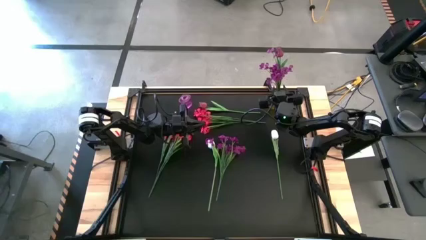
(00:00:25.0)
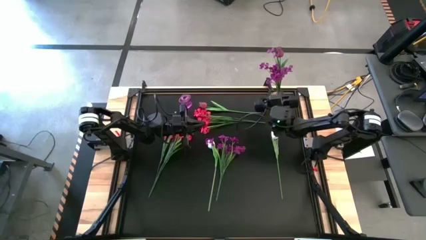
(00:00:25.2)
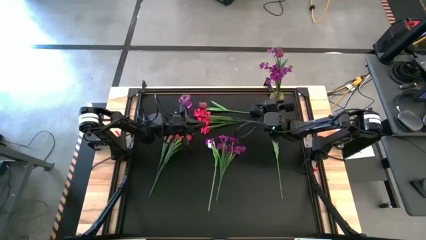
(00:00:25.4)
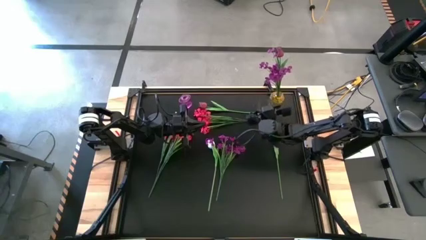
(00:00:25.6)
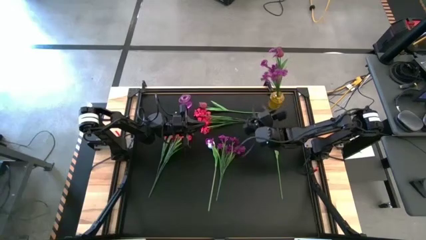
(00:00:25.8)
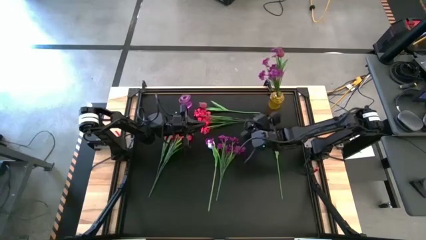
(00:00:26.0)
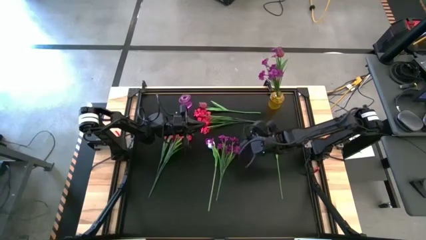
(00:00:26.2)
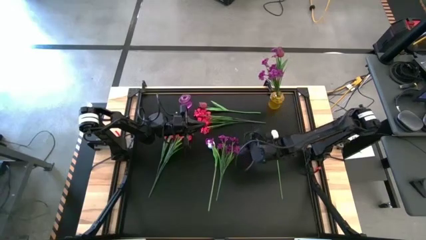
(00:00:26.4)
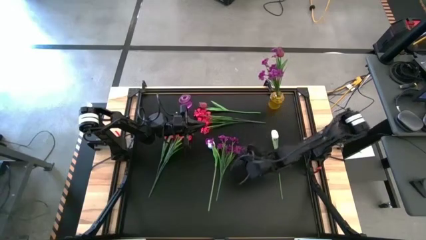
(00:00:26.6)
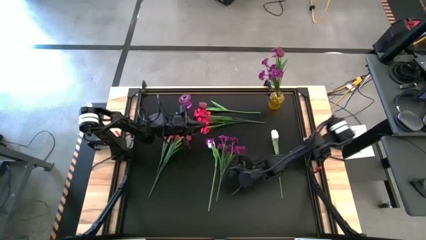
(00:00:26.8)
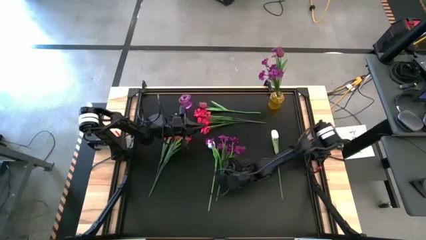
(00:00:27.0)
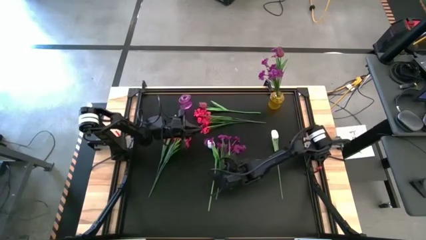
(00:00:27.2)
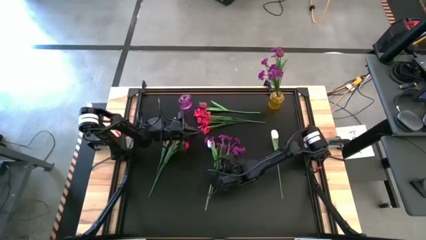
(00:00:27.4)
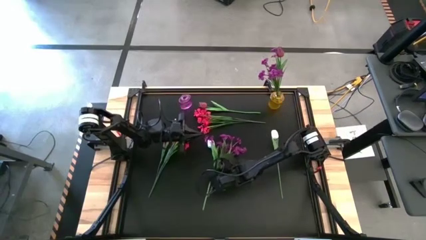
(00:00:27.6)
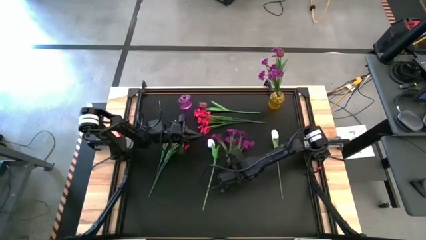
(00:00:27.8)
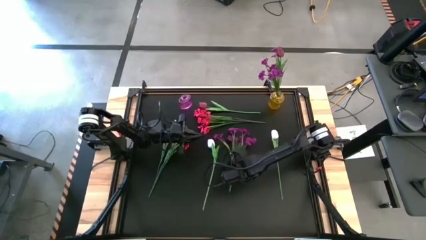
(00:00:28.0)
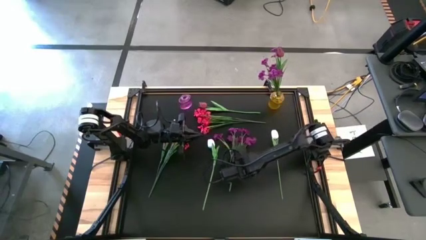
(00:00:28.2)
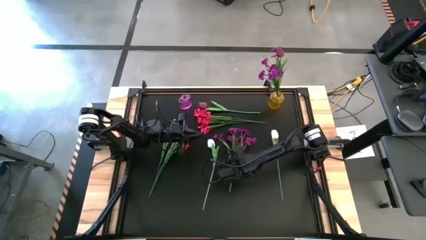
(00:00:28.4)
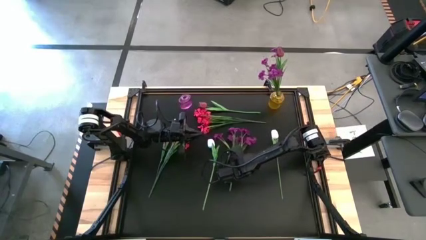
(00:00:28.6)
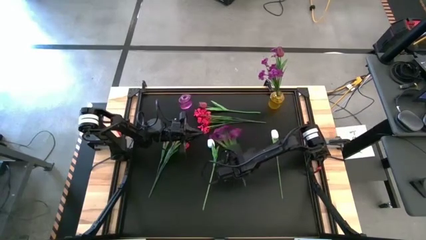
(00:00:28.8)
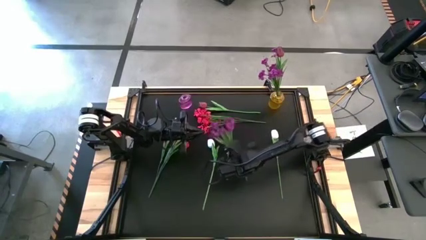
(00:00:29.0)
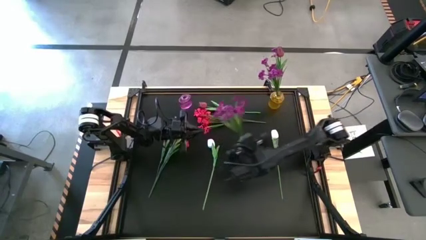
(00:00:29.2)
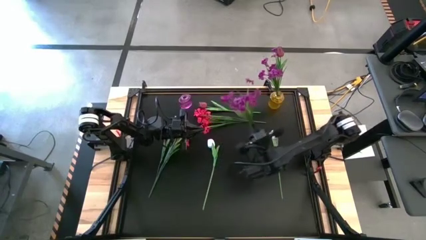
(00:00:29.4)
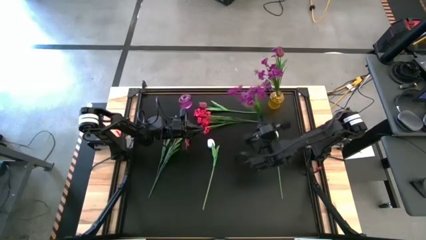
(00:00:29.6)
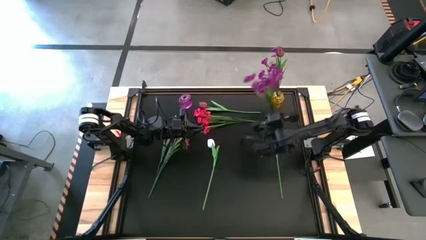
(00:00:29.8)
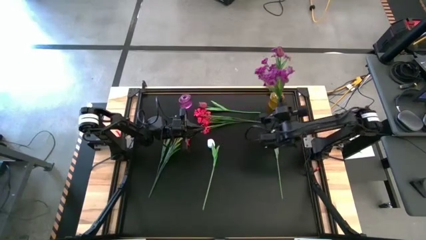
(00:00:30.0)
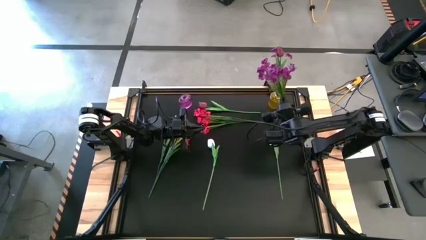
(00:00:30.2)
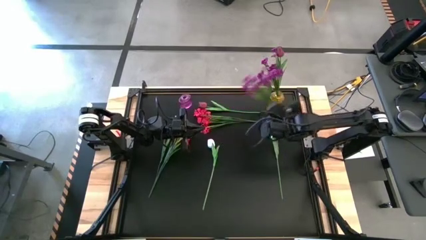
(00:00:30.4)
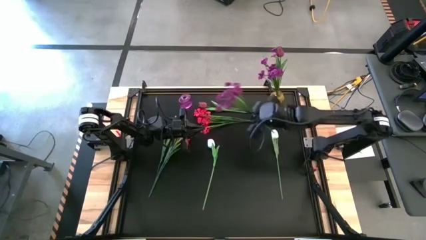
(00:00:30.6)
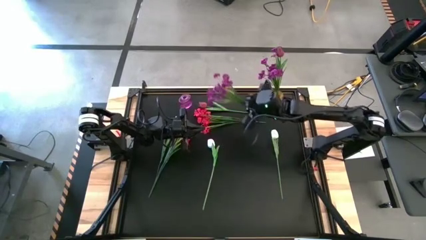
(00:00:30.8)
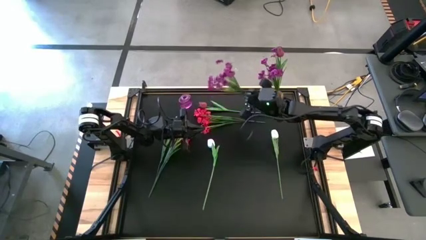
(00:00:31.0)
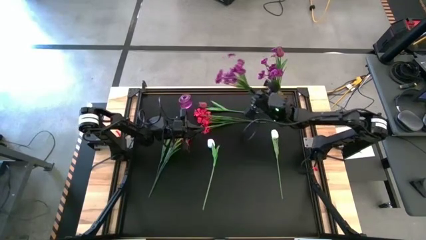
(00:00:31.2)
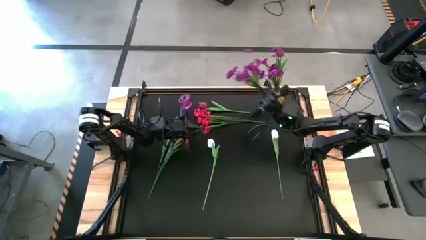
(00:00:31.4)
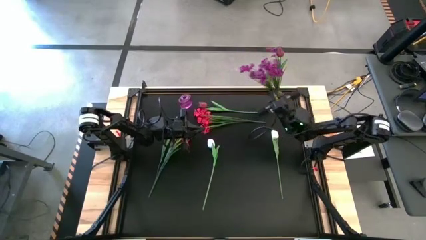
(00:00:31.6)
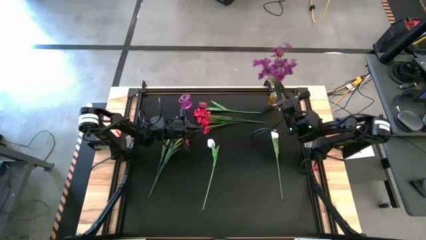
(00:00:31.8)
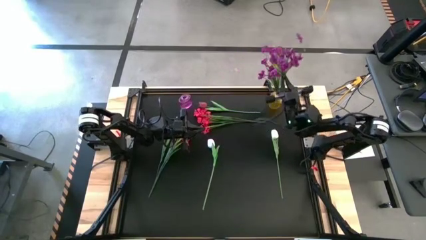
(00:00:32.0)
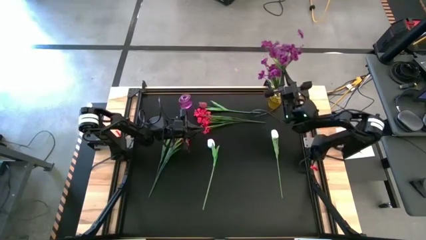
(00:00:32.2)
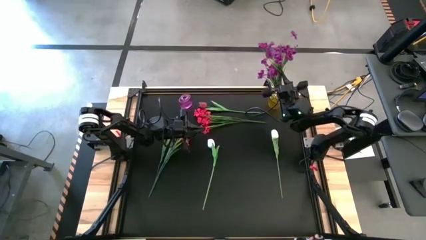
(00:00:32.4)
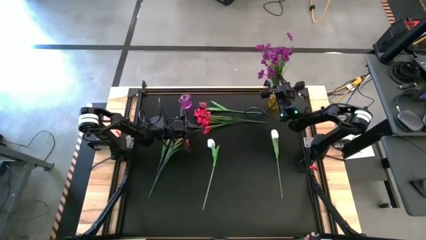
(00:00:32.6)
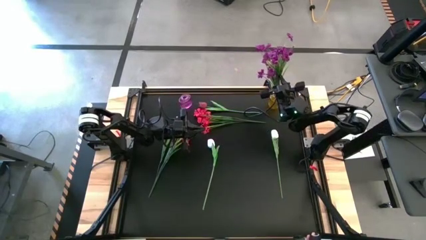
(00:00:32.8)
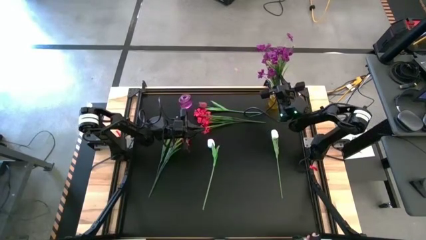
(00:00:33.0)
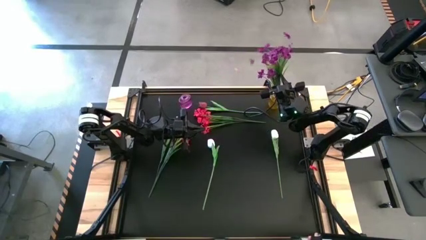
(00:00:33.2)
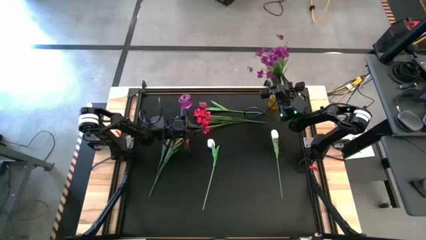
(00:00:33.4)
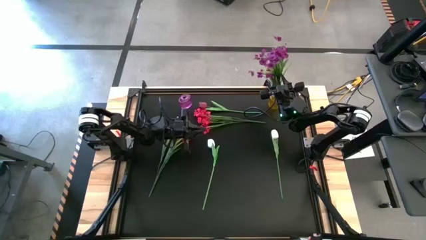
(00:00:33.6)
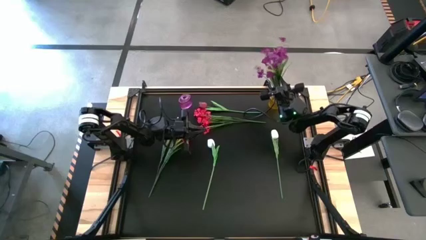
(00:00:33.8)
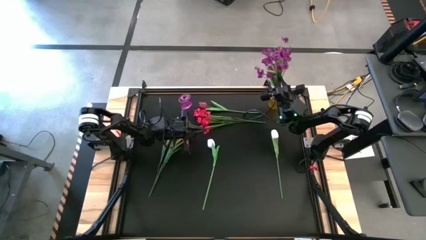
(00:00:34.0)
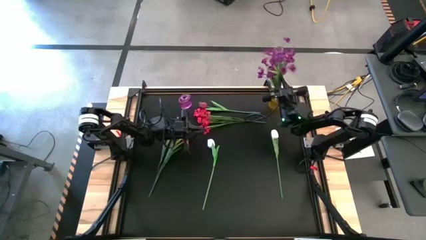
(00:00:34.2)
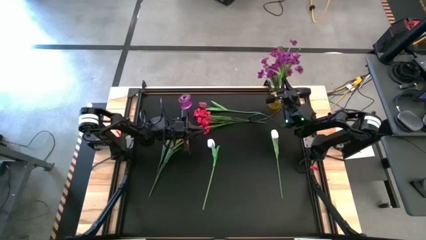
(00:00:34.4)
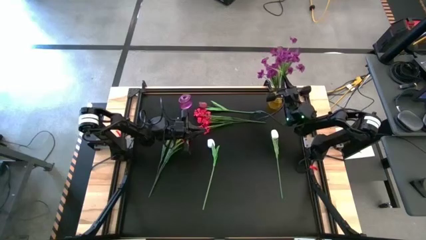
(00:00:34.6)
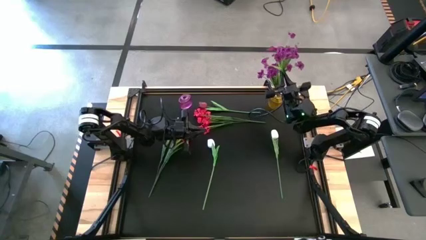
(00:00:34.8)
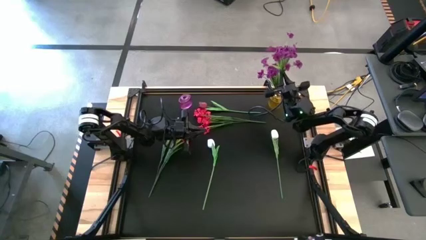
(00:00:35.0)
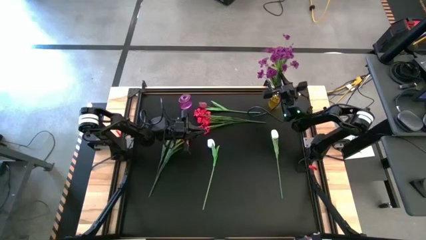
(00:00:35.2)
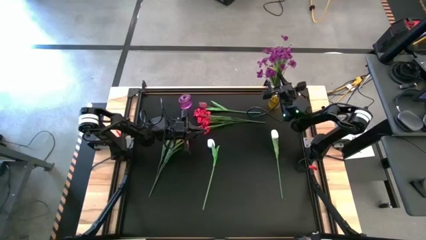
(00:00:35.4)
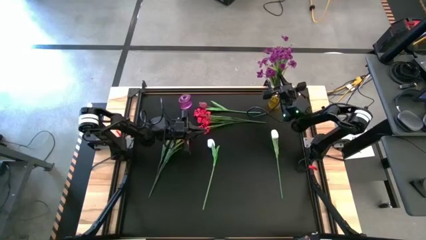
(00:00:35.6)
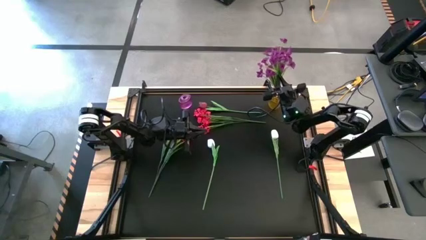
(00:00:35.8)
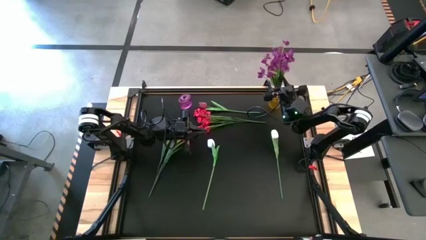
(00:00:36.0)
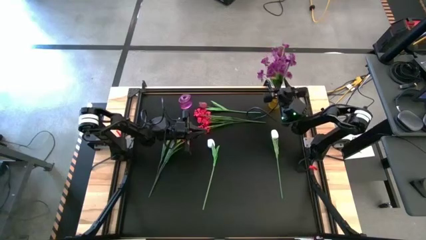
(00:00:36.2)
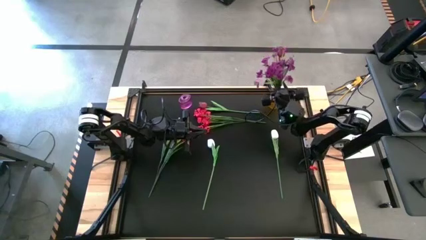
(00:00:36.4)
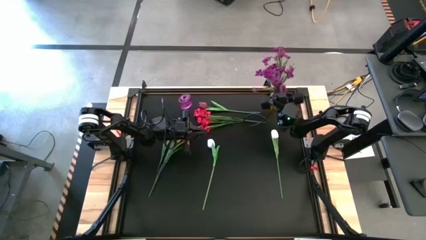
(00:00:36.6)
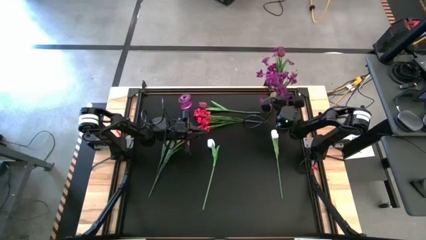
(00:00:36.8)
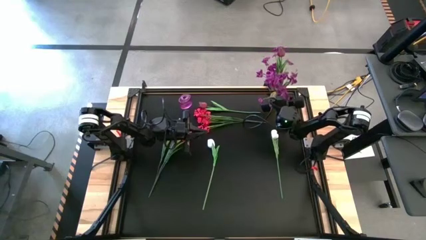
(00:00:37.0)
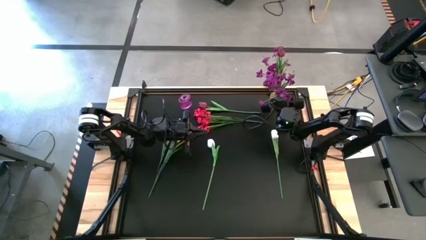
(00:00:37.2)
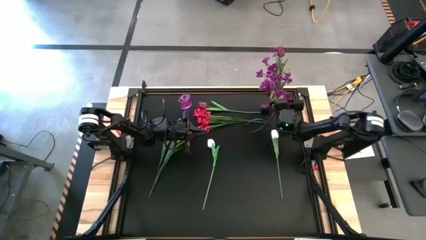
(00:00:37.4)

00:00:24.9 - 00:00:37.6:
Task: Sort flowers into vase by color
Put the purple flowers into the yellow vase
